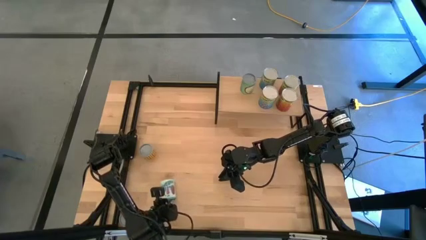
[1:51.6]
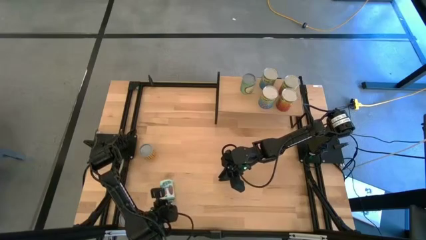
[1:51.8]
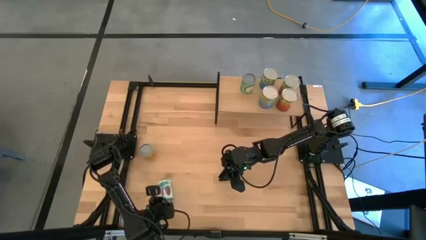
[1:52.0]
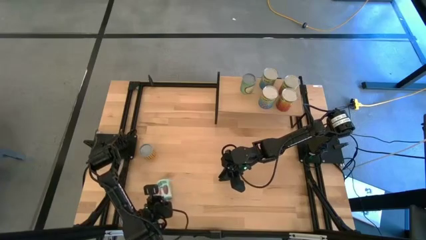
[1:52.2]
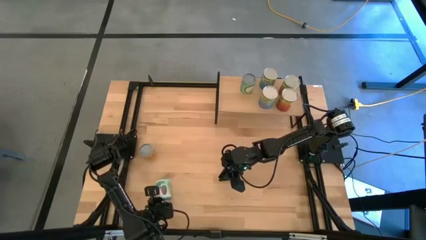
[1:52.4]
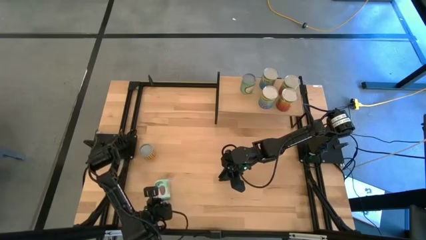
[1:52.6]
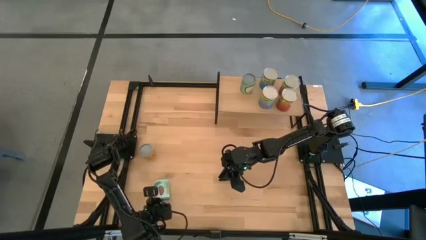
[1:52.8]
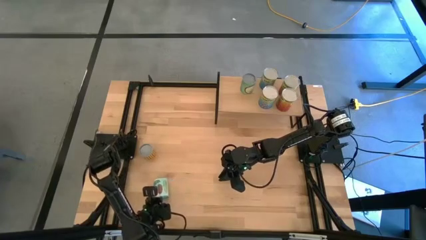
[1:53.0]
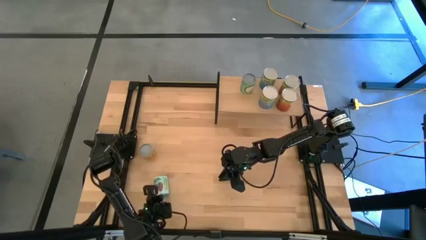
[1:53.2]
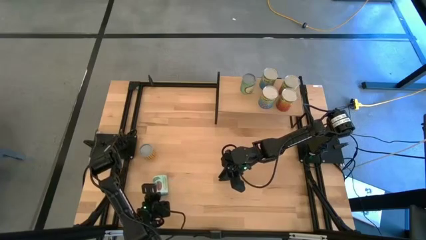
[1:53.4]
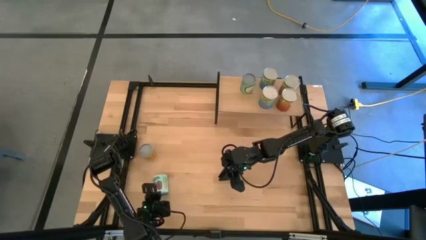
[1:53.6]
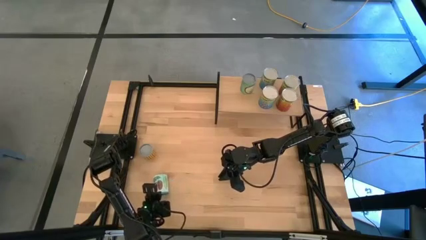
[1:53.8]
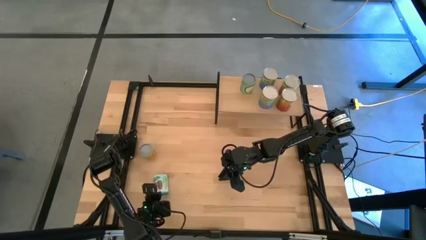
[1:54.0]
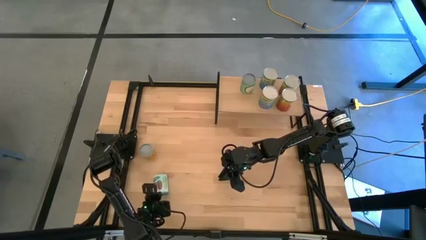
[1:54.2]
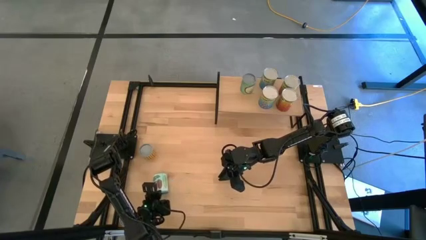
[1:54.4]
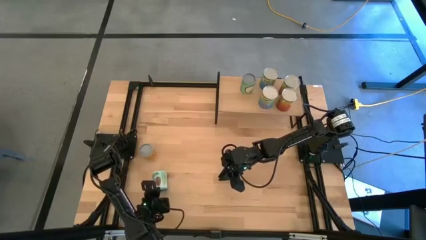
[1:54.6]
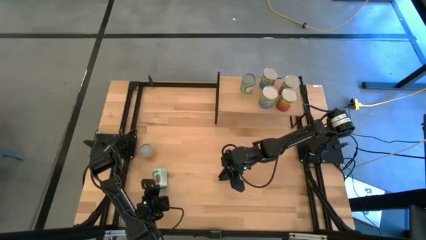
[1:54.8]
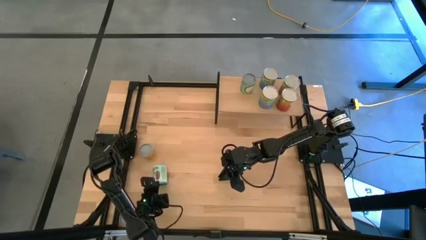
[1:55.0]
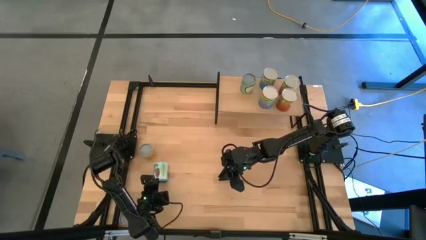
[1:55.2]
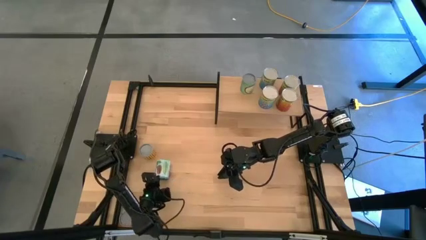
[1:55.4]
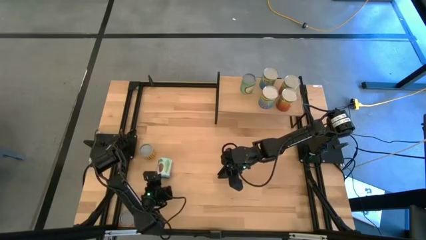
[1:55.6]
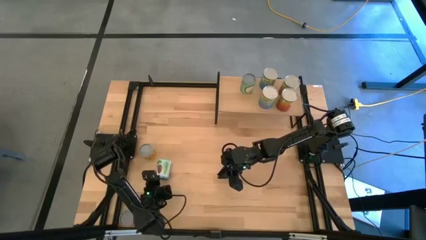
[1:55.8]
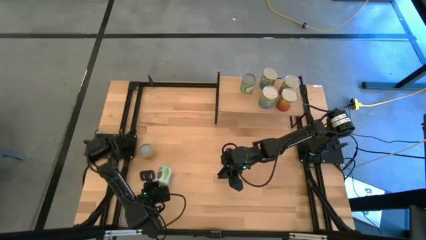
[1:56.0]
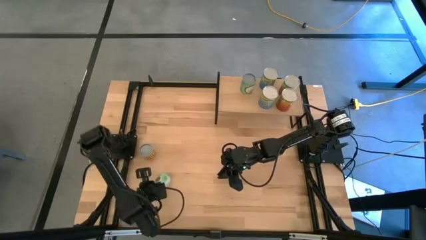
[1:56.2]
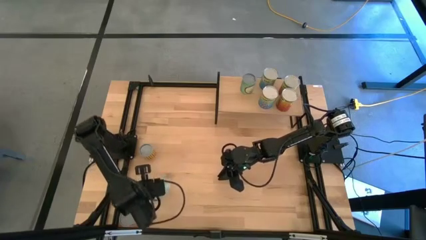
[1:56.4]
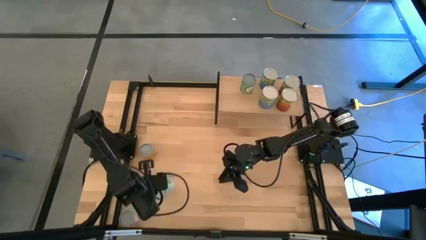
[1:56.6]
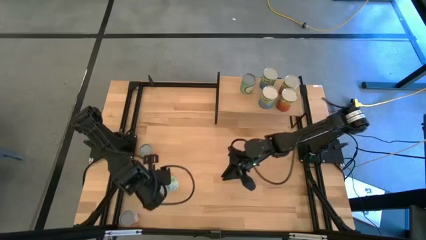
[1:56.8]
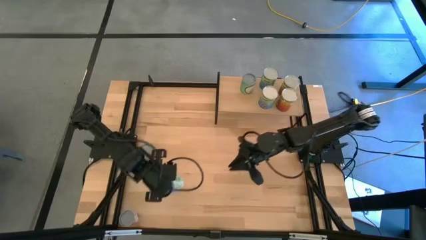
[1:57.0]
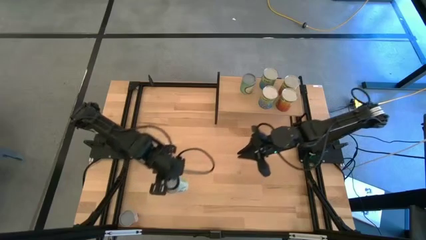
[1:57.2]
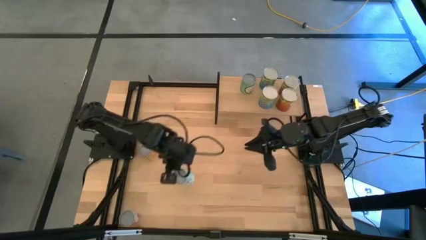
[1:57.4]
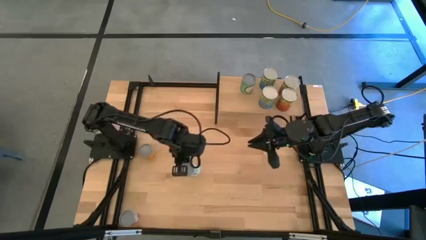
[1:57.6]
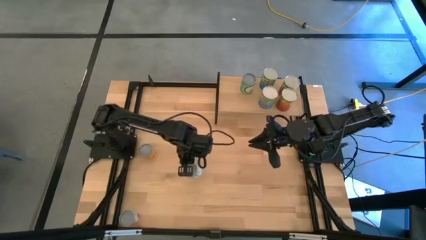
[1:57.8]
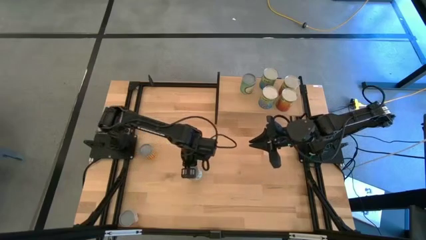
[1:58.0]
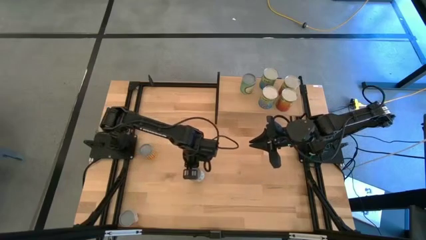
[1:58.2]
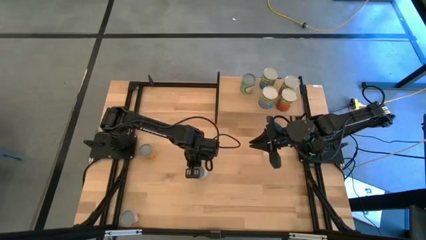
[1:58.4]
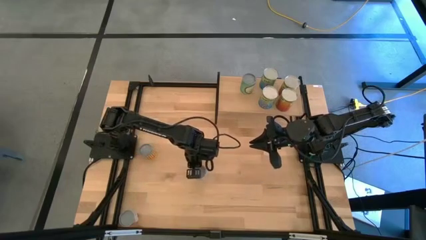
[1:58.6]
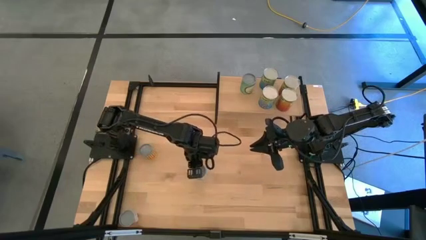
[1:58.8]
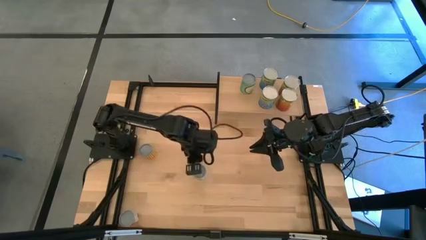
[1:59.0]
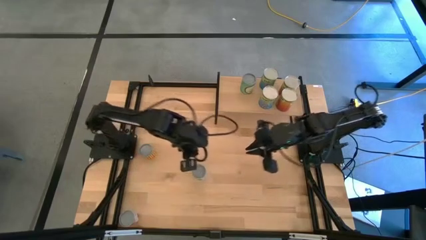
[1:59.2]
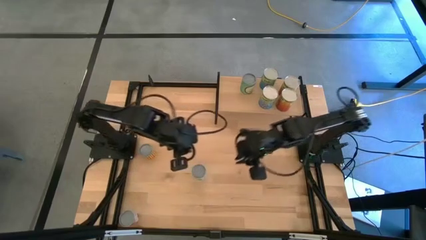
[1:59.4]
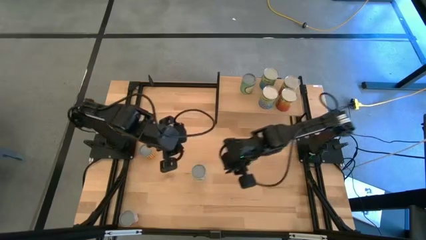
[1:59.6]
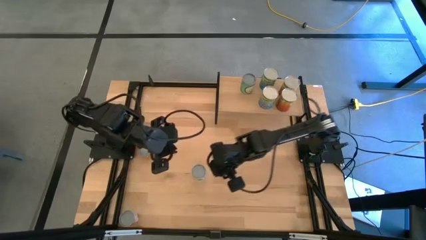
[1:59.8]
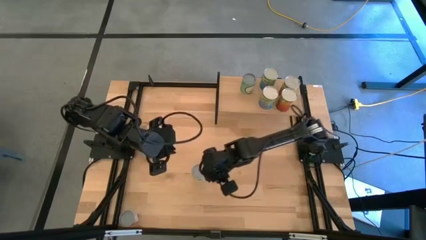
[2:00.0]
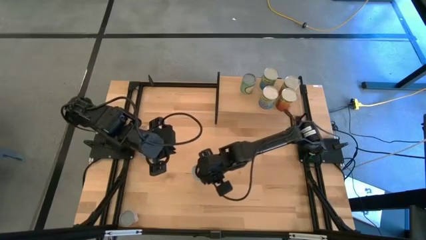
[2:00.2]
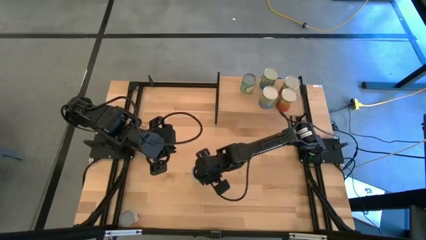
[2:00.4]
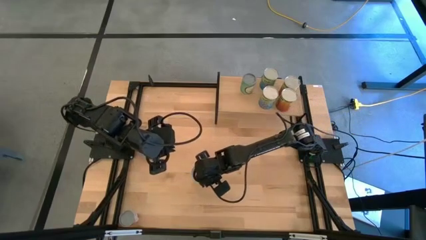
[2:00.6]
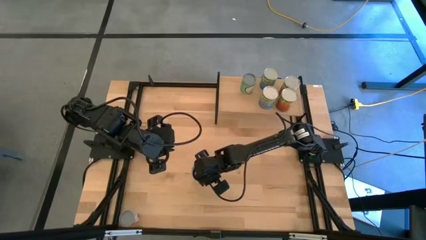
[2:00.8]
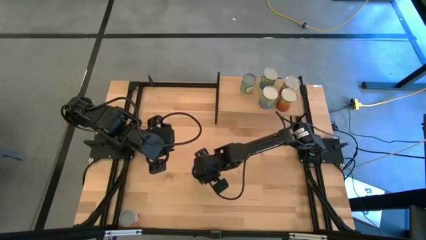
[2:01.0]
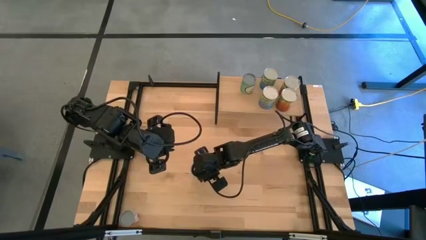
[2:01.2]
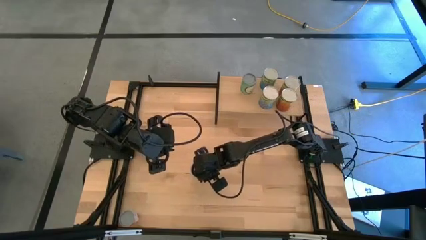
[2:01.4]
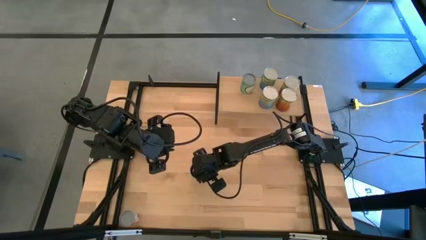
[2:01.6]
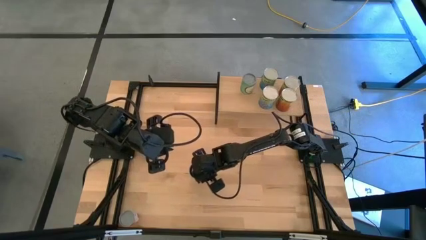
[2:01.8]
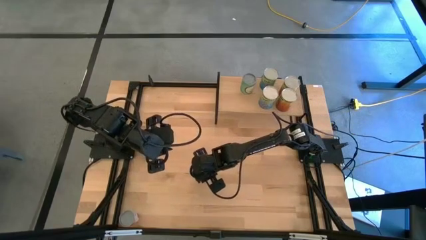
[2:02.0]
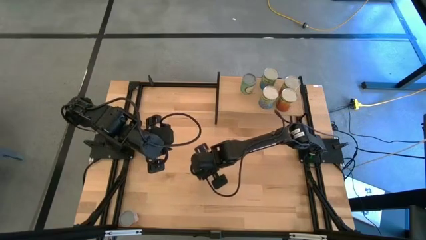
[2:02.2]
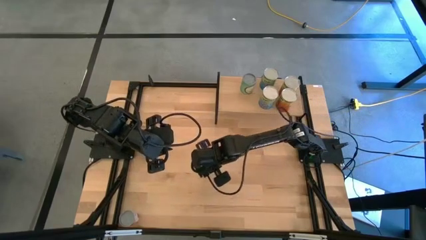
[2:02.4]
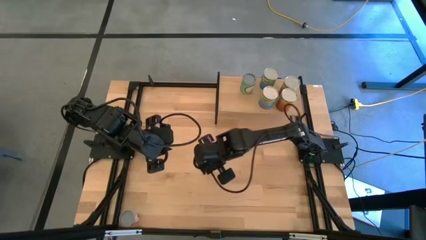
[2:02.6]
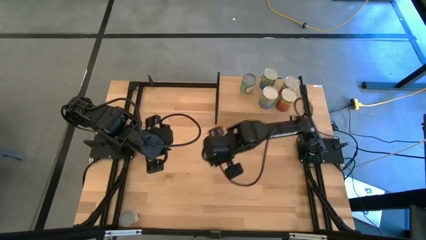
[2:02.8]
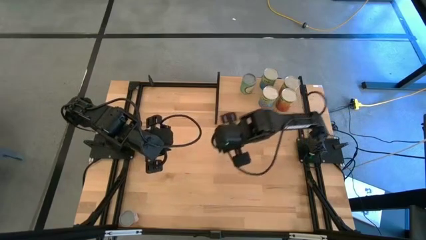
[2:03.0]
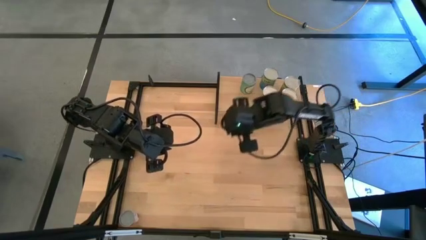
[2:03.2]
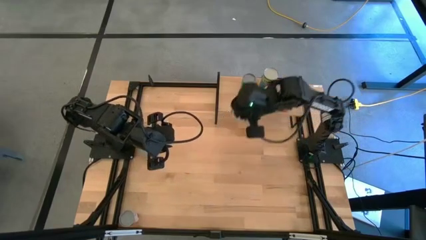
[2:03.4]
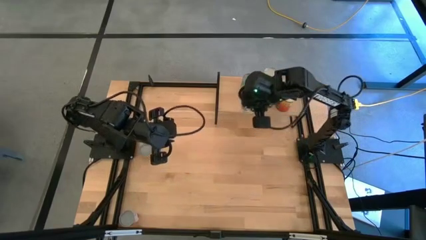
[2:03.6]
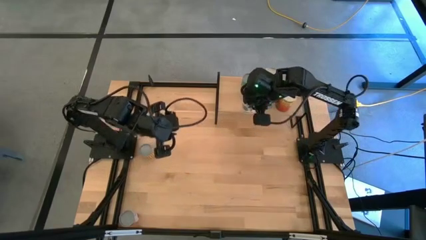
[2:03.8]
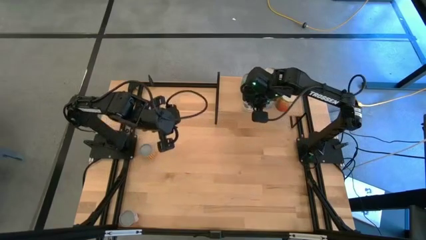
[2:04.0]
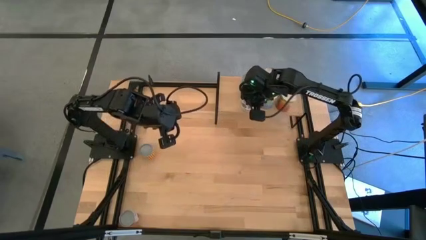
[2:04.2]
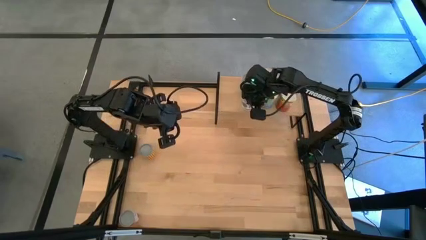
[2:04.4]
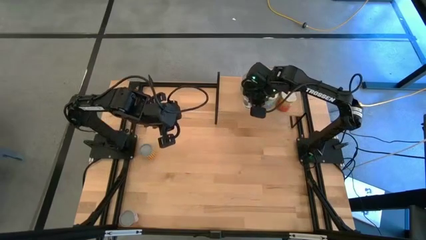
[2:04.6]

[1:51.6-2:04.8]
Task: Pick and place cans onto a shelf
Put the white canned good on the shelf
